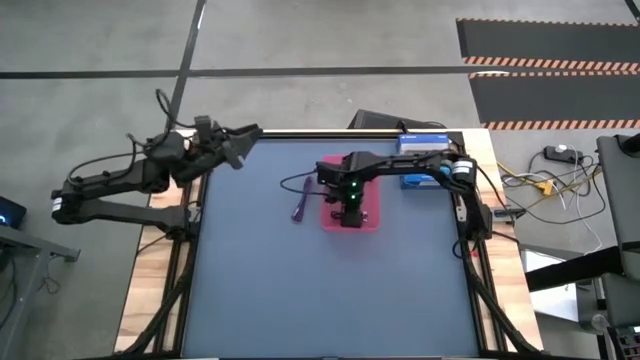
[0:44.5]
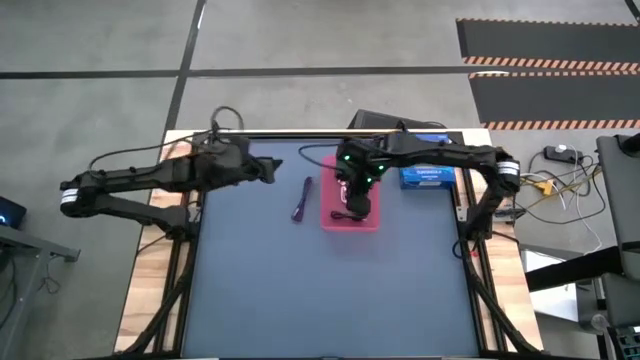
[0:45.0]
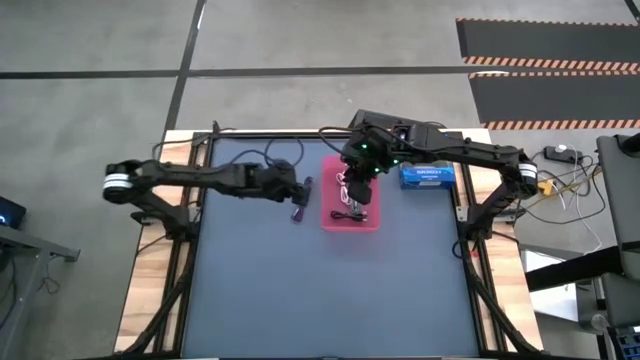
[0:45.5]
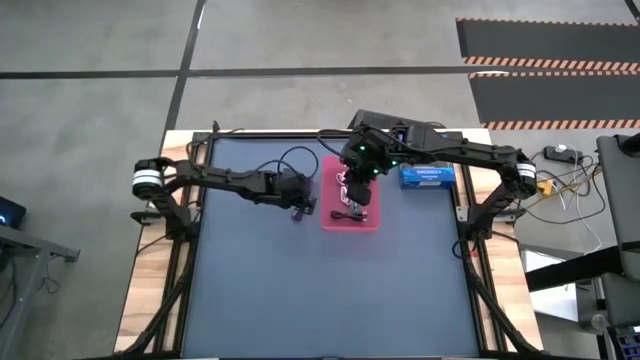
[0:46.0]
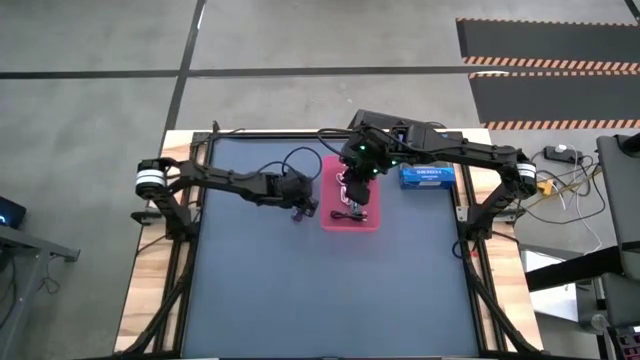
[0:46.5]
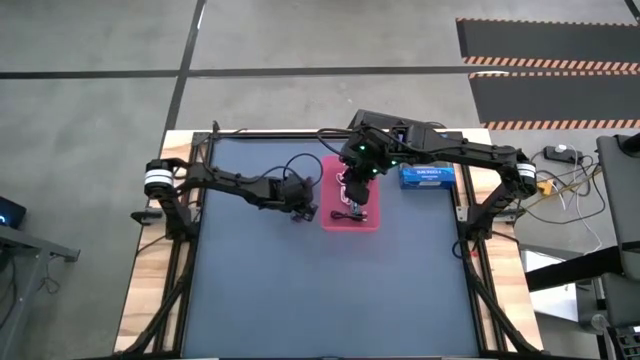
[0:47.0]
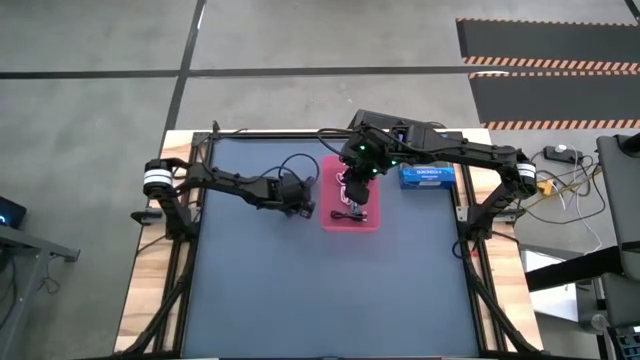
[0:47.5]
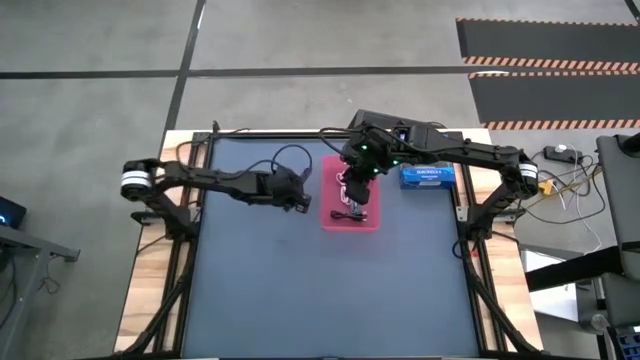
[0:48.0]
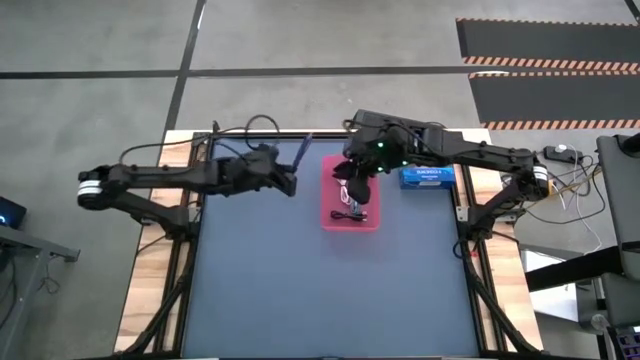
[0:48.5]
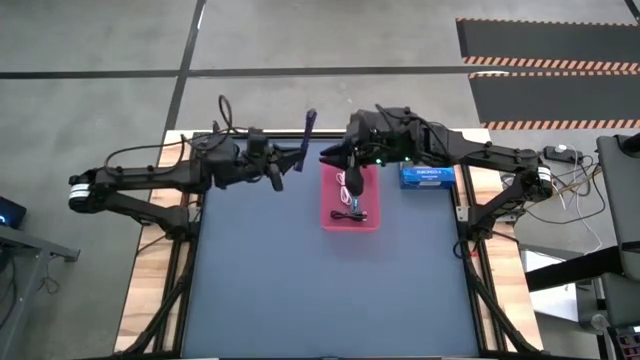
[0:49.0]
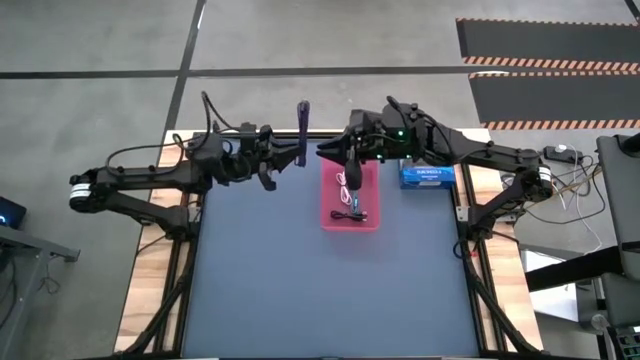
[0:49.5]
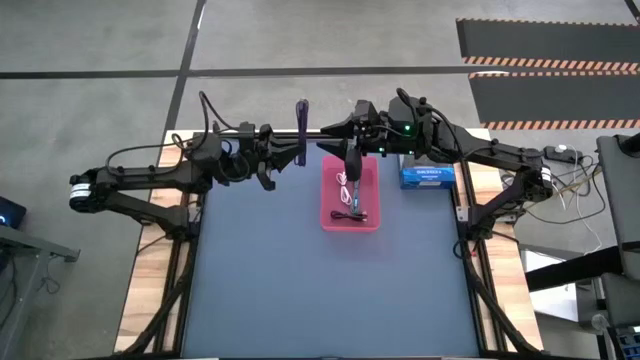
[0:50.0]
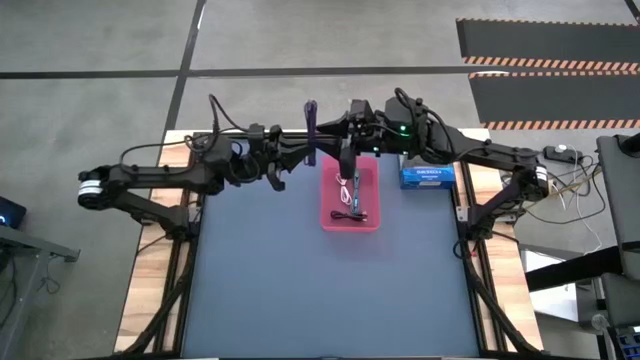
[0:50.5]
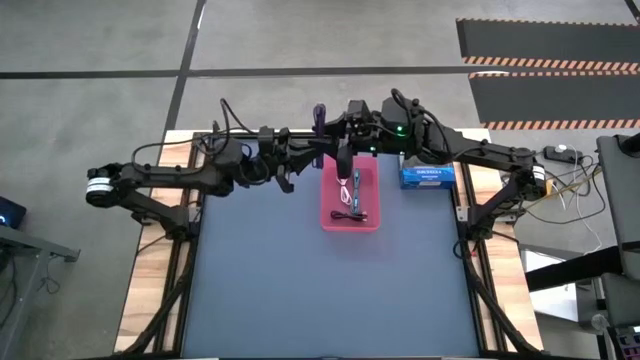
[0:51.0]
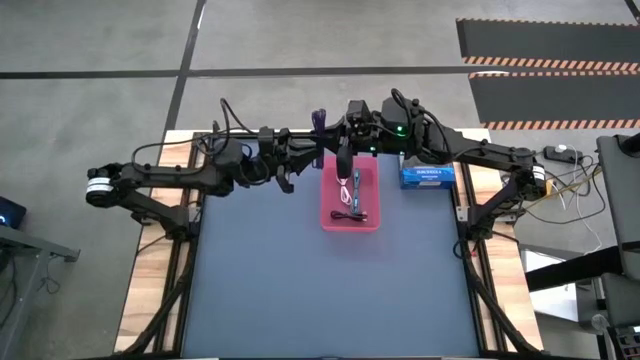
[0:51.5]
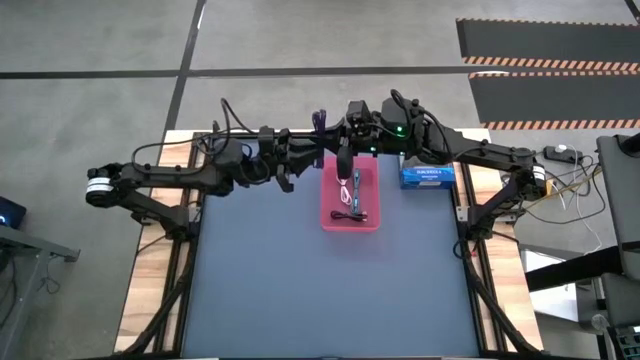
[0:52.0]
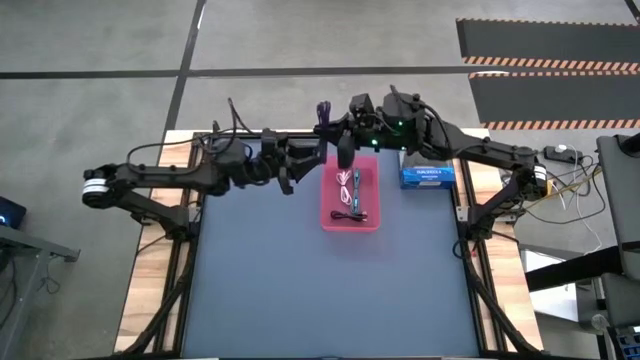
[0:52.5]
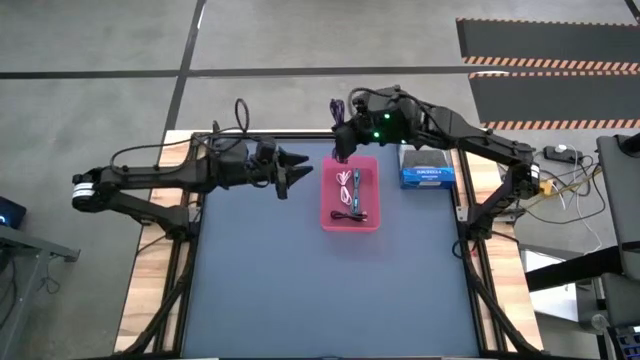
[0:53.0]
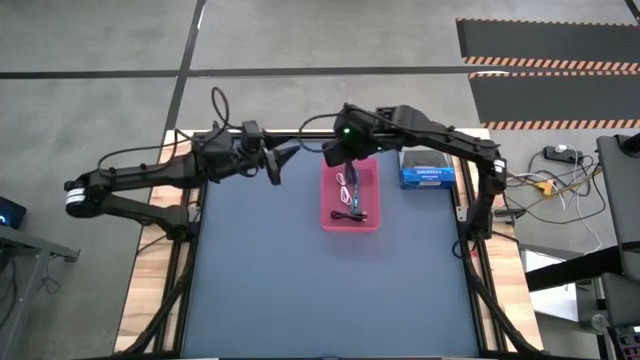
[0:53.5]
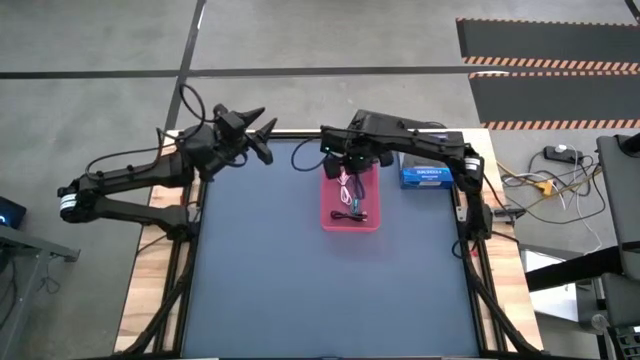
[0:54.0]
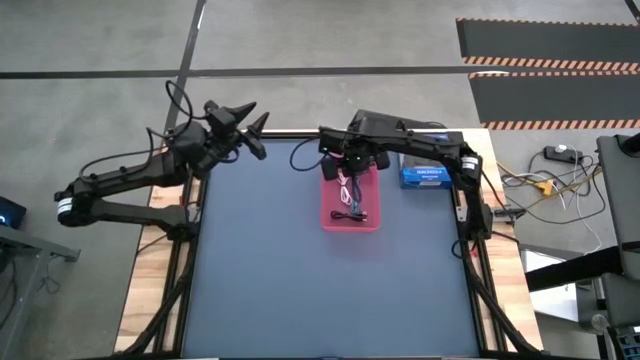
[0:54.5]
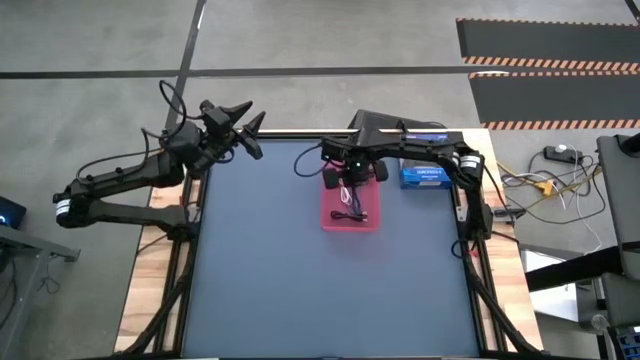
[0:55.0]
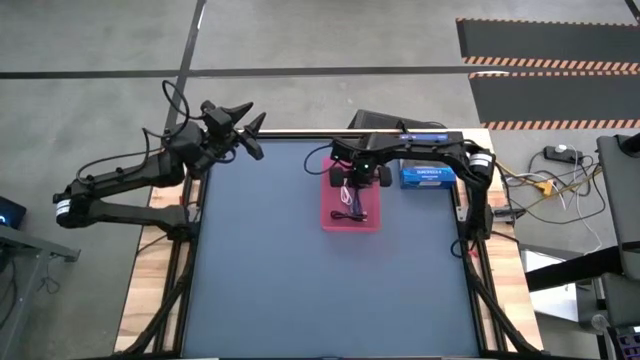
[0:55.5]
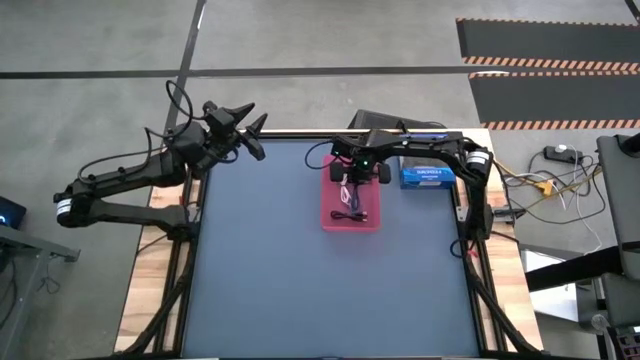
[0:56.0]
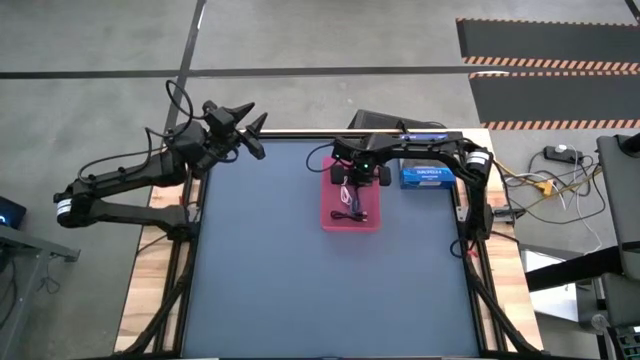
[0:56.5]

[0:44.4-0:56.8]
Task: Pick and place USB-C Cables
Put the violet USB cable into the red bin

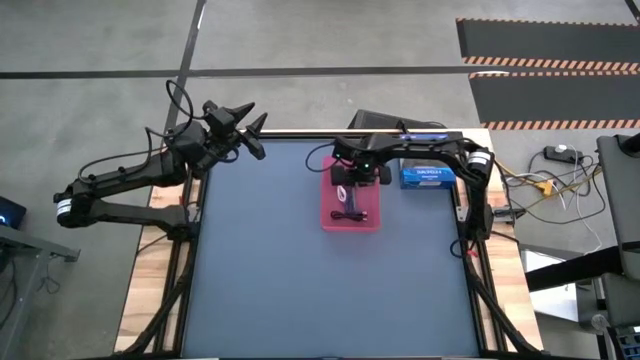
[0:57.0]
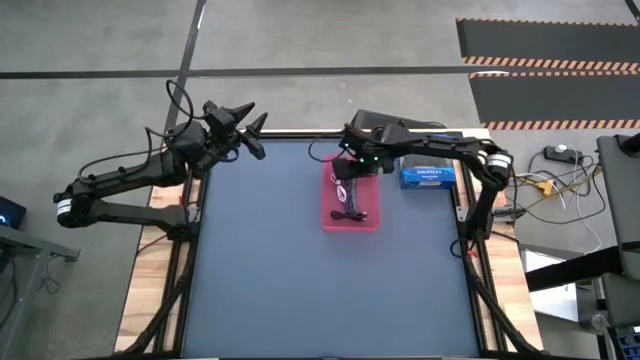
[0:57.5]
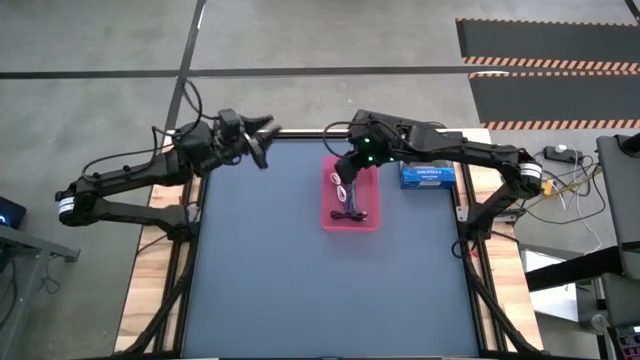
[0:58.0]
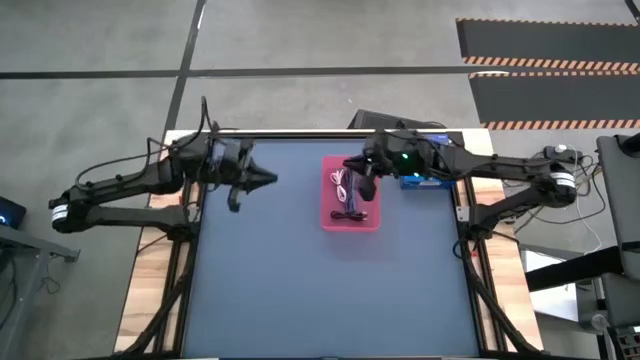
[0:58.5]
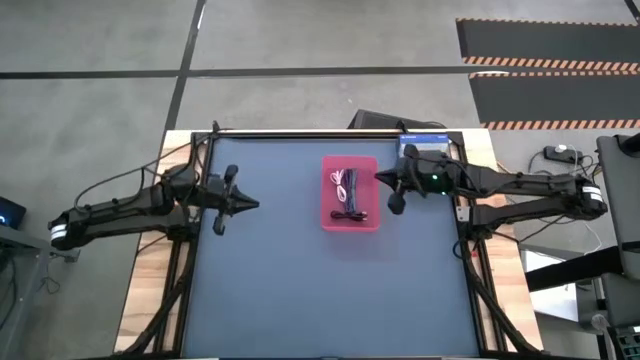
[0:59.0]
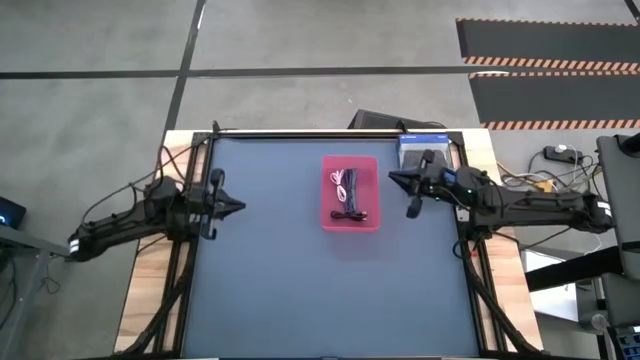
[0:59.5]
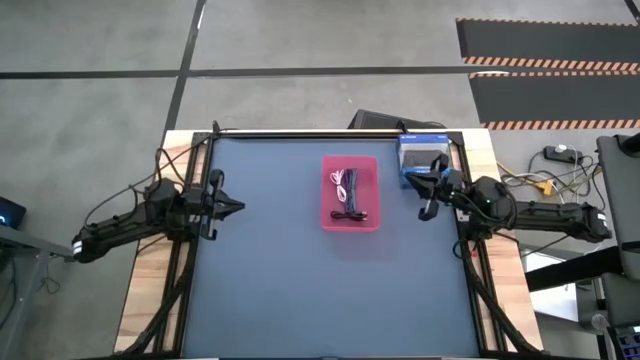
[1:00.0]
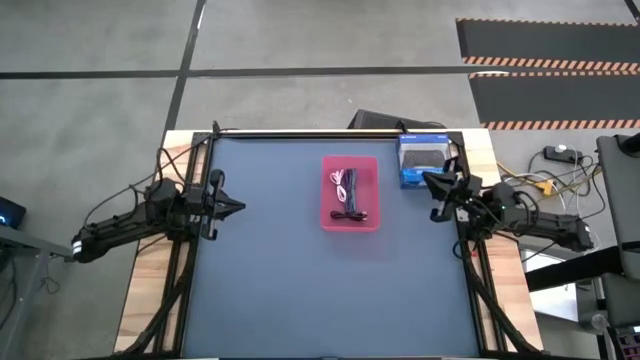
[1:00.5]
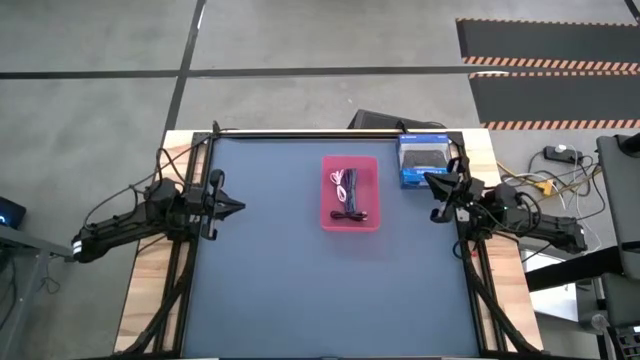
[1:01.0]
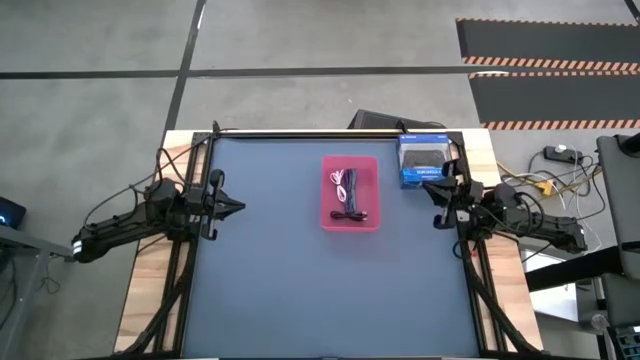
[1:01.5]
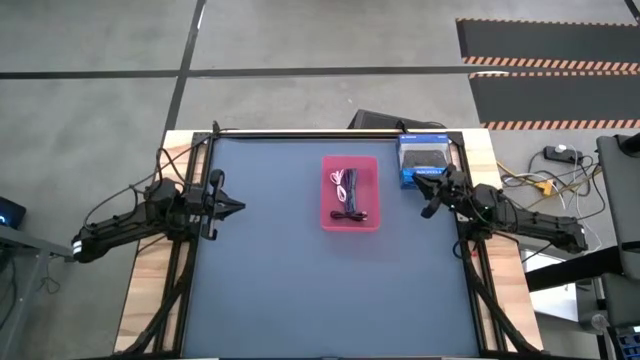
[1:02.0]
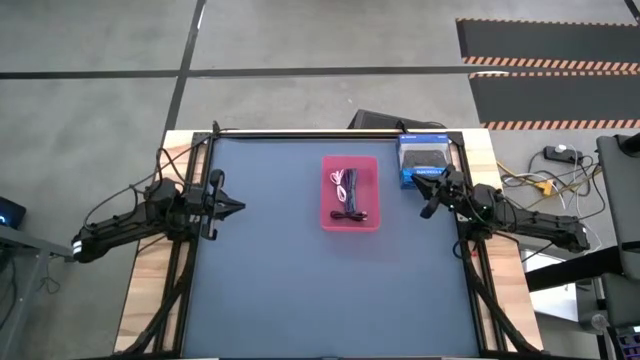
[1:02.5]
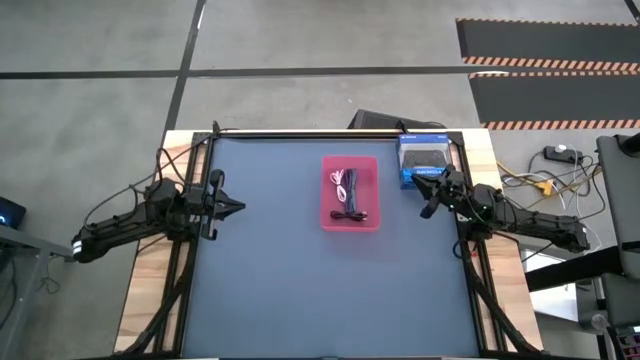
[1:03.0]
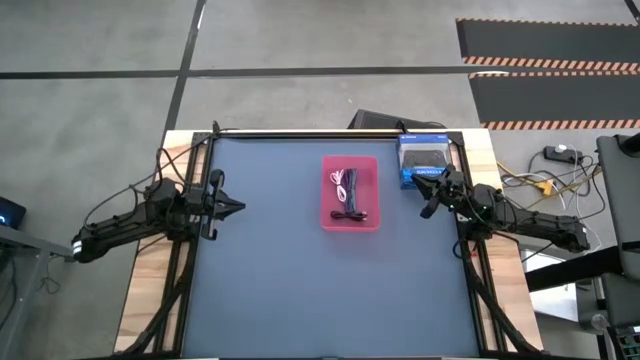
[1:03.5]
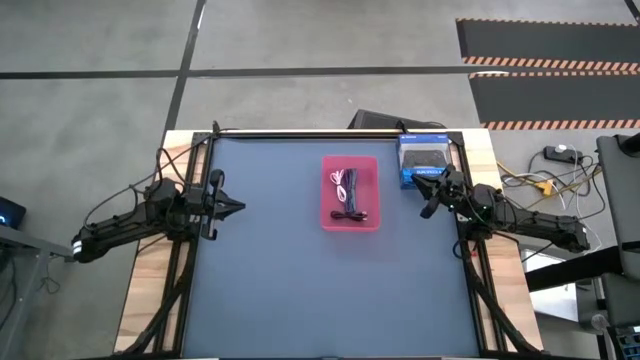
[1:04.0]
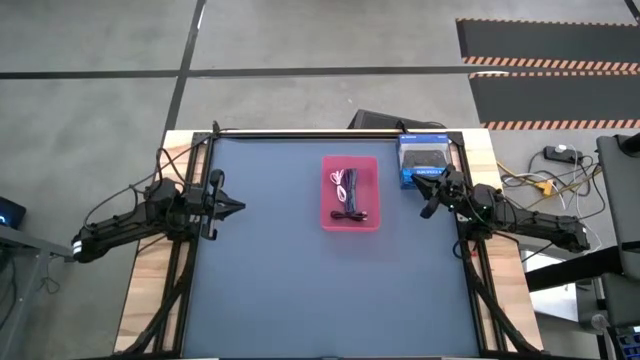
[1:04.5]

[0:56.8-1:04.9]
Return to Home Position

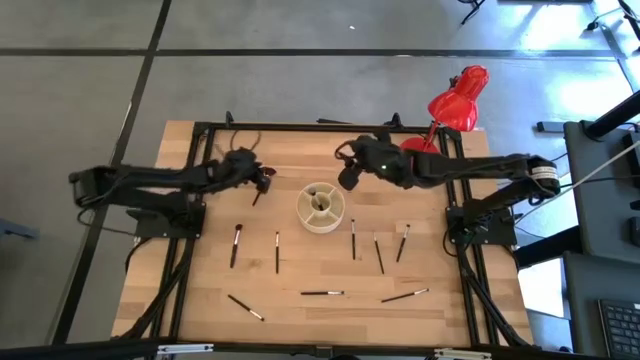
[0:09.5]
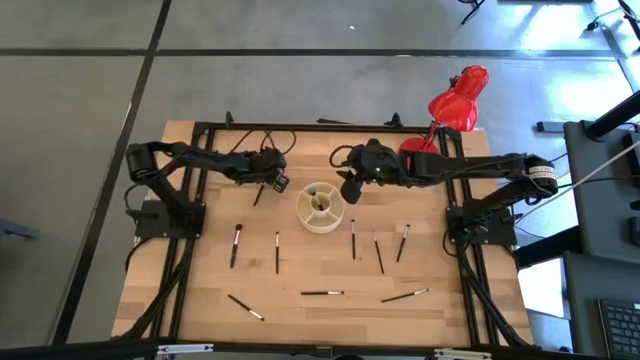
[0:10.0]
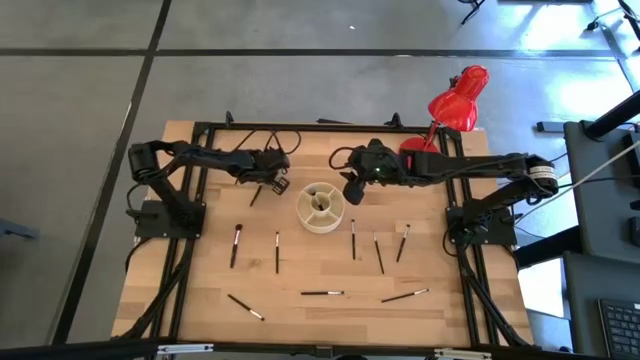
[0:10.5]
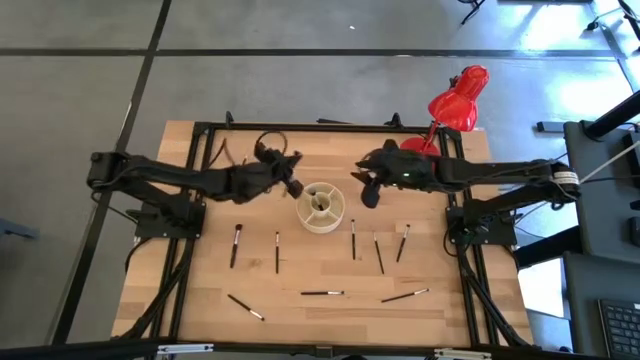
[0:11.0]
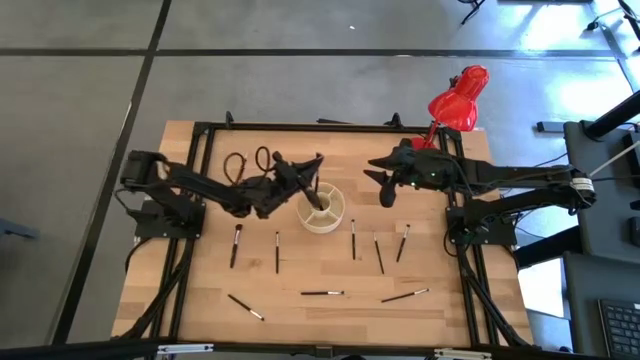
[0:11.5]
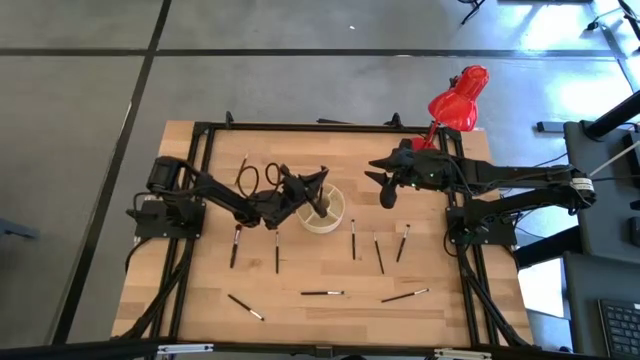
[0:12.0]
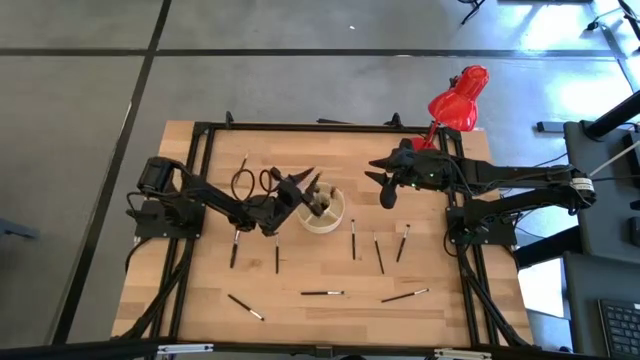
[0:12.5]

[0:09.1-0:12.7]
Task: Put items in baskets/containers
Put the highlighter brush into the white organizer
